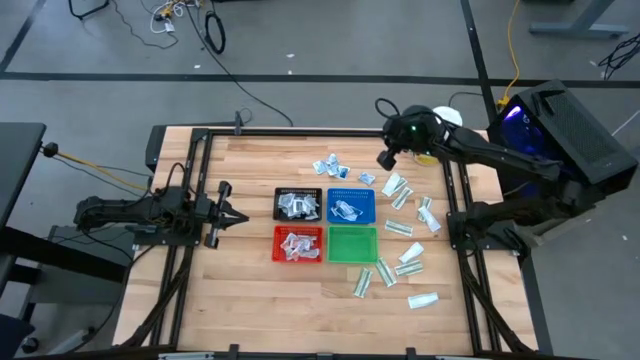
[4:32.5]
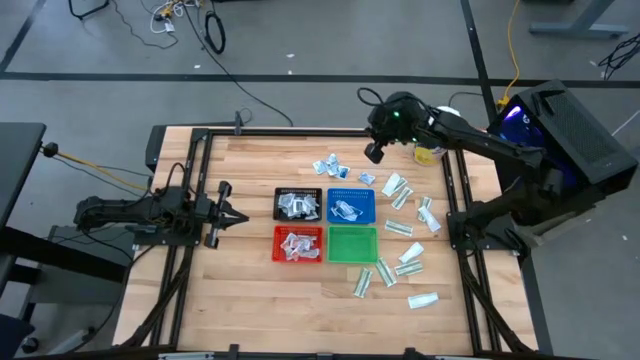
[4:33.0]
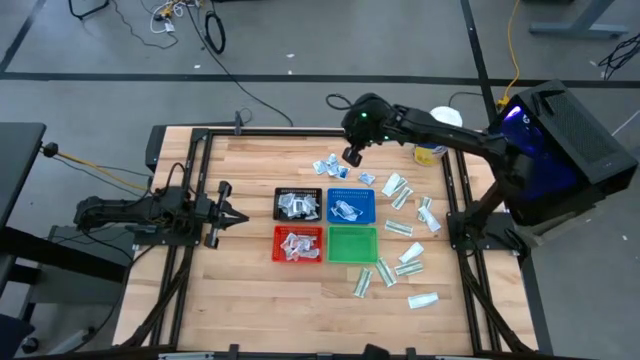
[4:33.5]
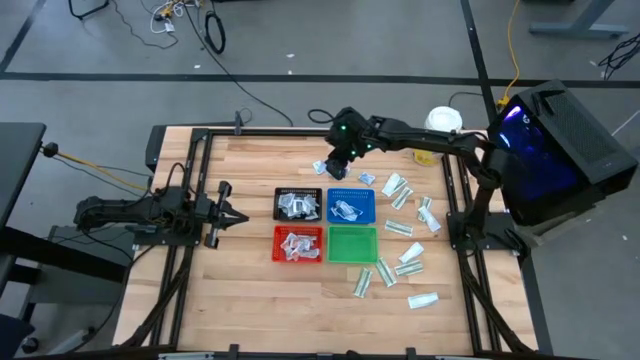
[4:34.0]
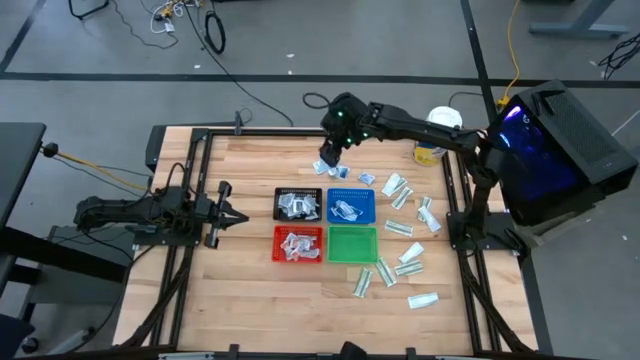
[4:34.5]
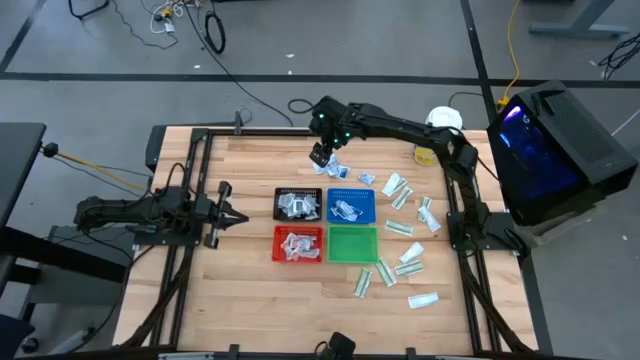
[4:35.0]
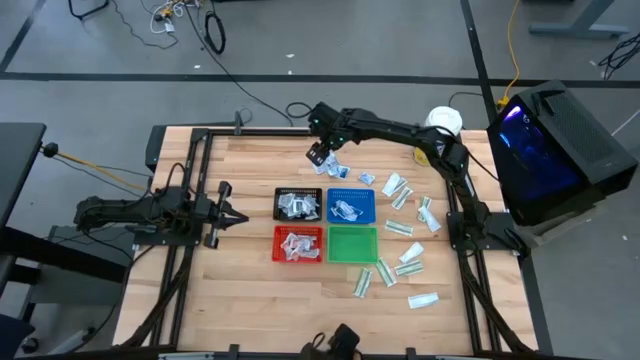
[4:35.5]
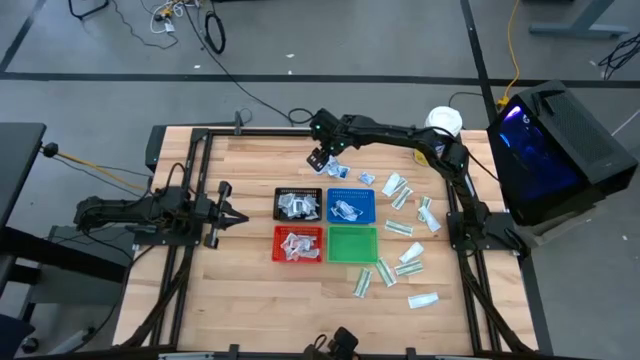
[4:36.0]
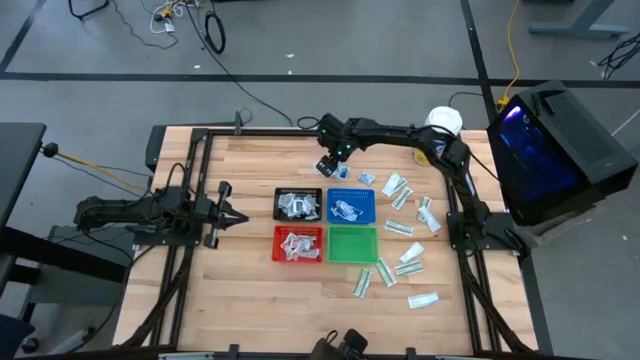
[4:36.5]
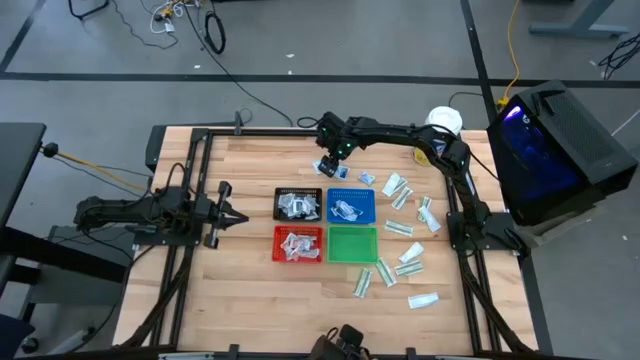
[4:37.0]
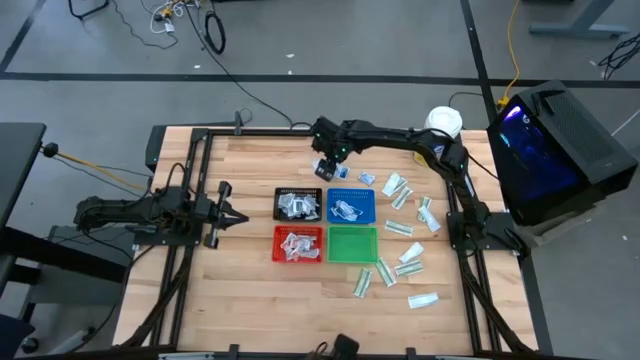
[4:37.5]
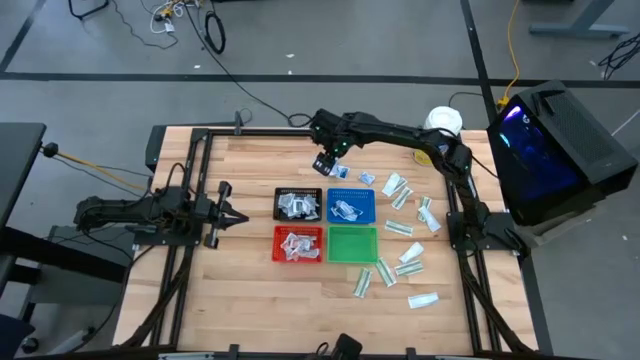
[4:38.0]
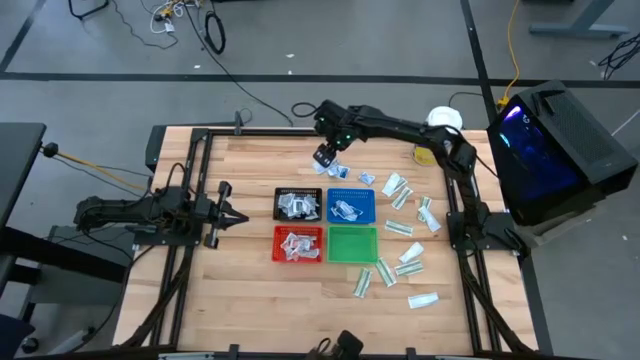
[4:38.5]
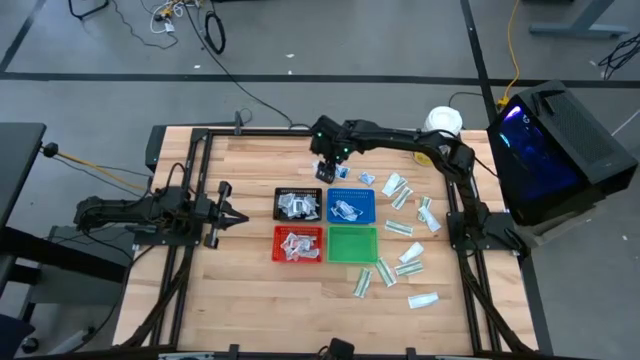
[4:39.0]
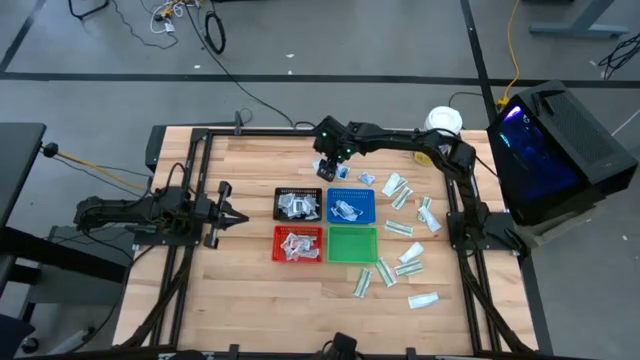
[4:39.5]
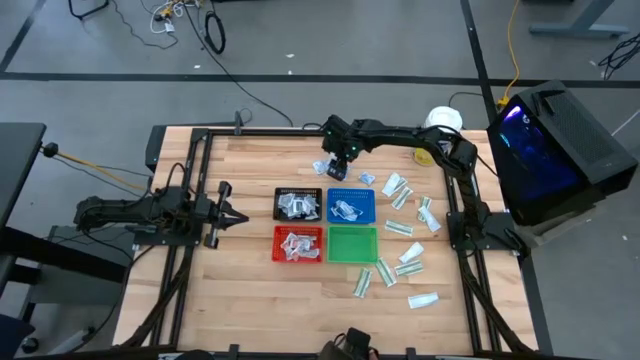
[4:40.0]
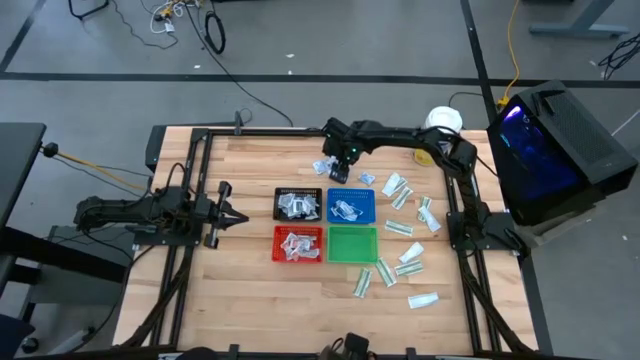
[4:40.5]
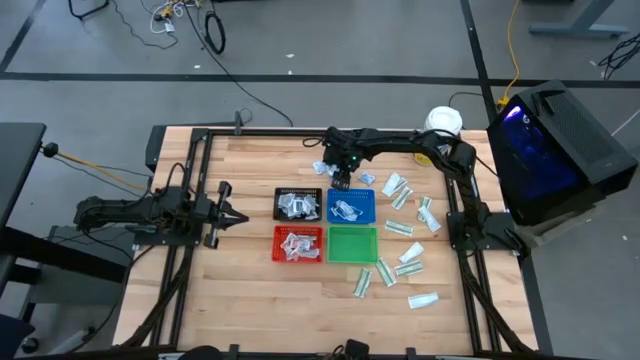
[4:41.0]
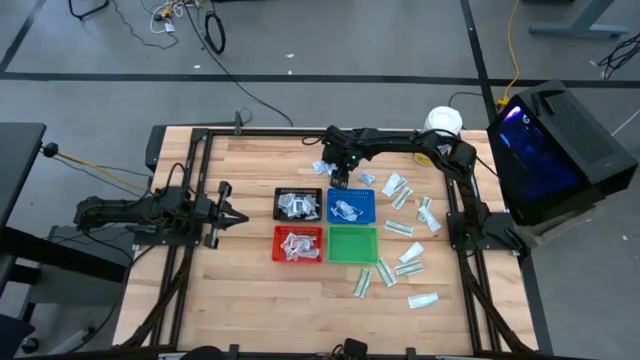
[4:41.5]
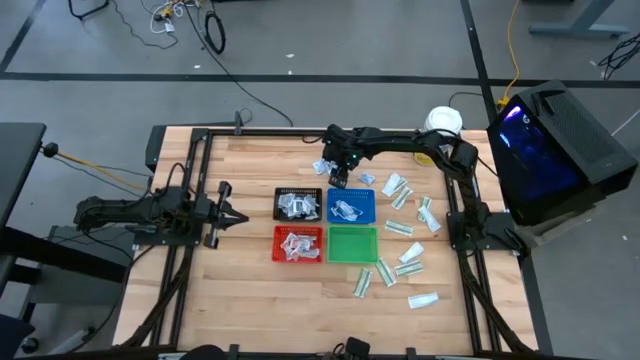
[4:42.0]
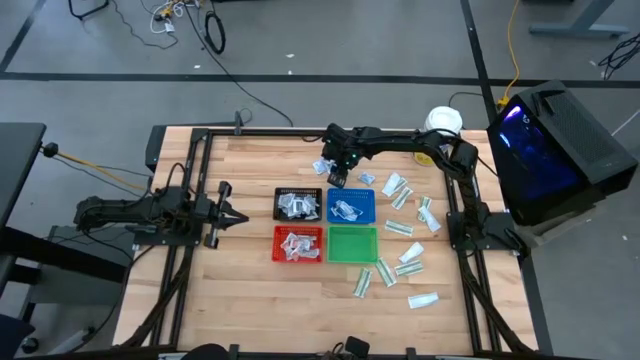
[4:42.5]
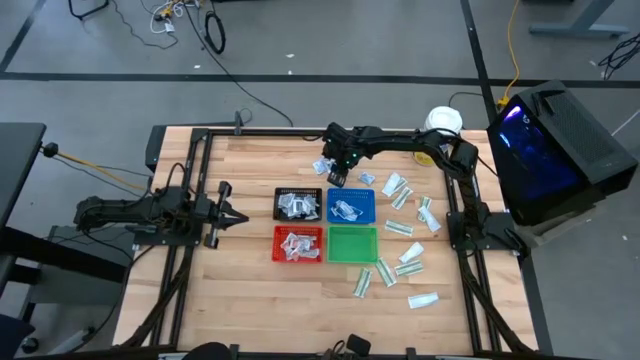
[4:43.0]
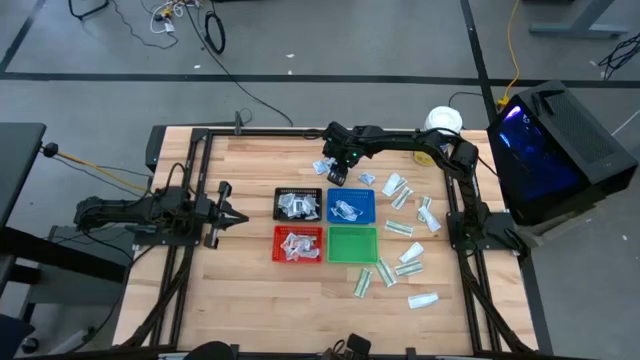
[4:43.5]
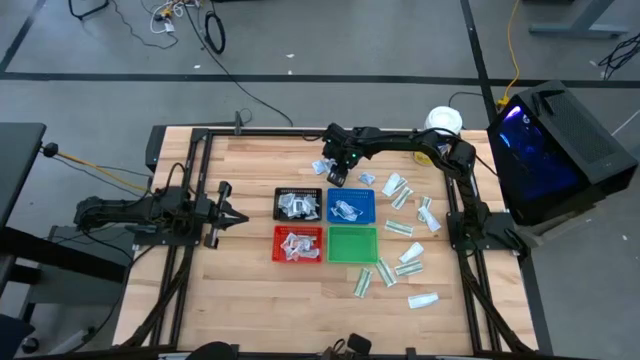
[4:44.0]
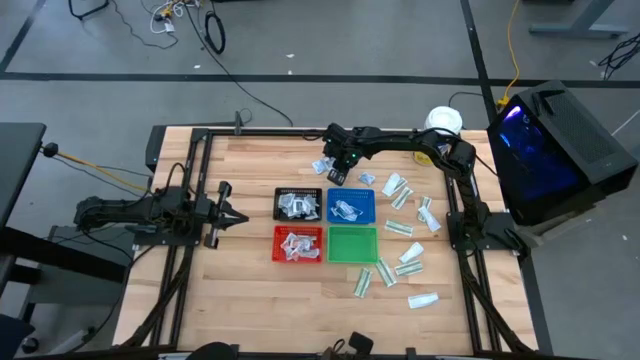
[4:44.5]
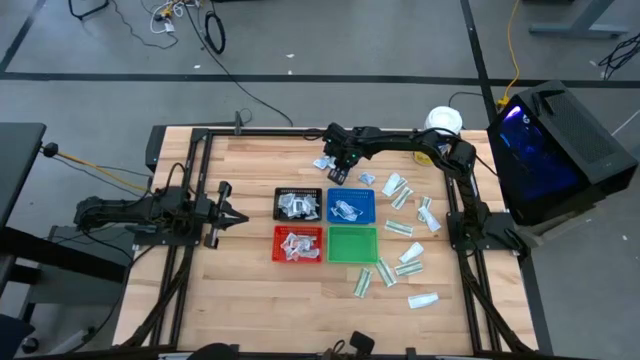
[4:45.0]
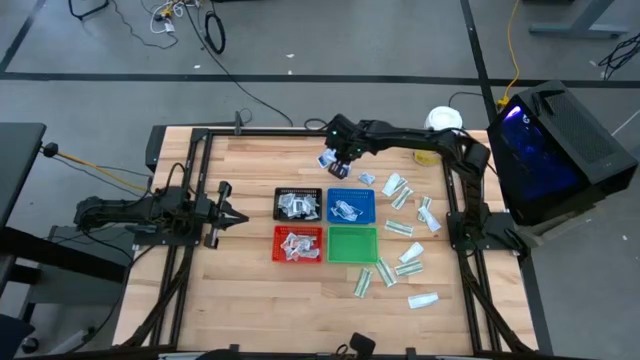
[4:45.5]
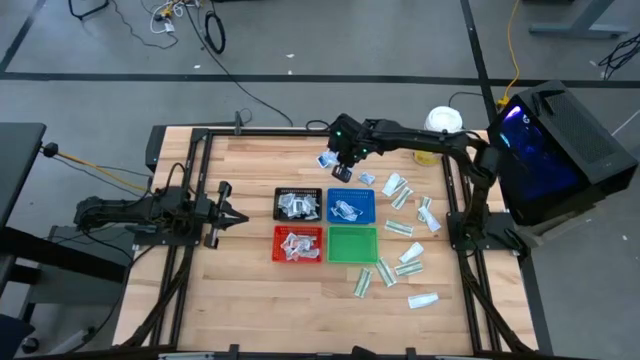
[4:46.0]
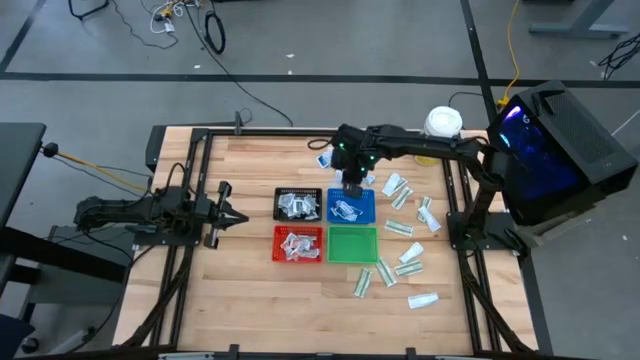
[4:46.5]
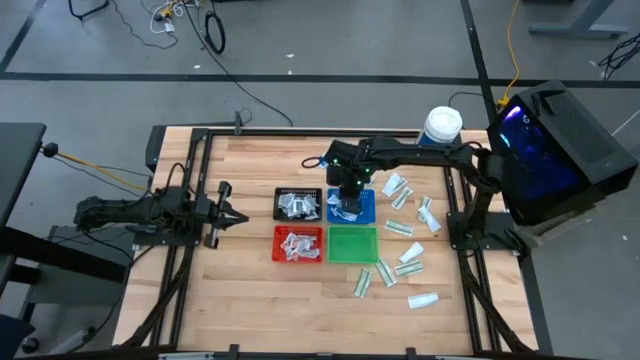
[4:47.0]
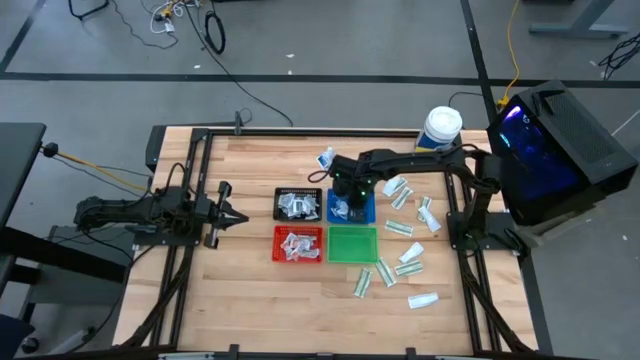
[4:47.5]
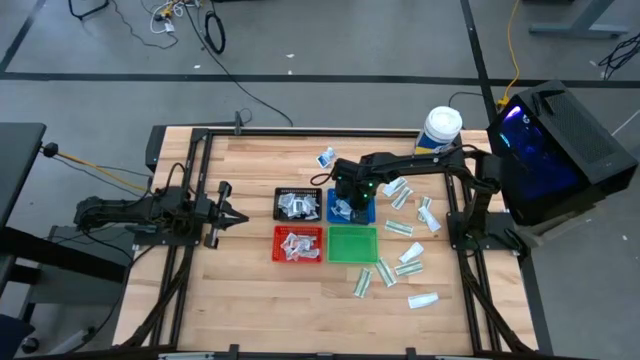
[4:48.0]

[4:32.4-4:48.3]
Task: Pick & Place First Aid Supplies
Put the blue alcohol pad into the blue bin

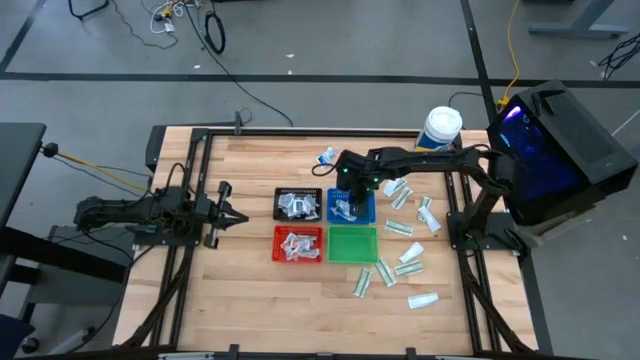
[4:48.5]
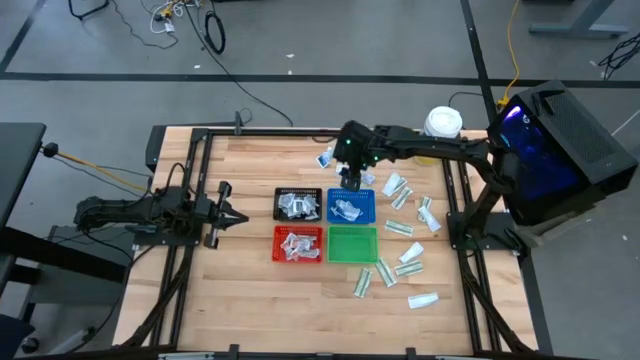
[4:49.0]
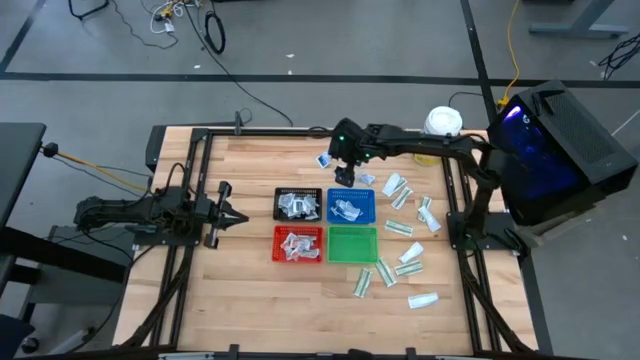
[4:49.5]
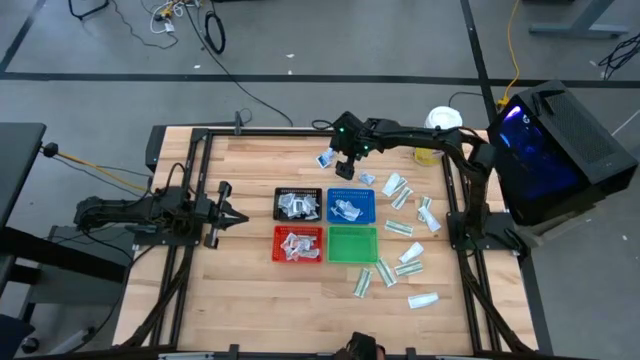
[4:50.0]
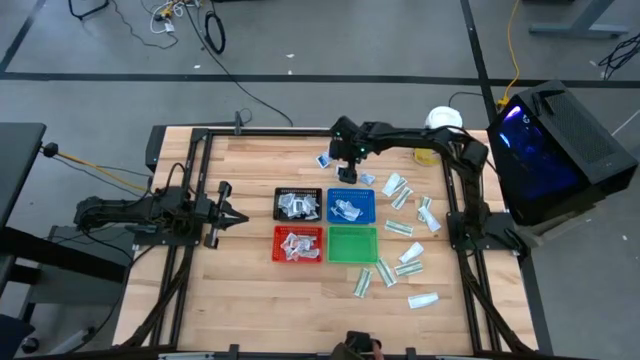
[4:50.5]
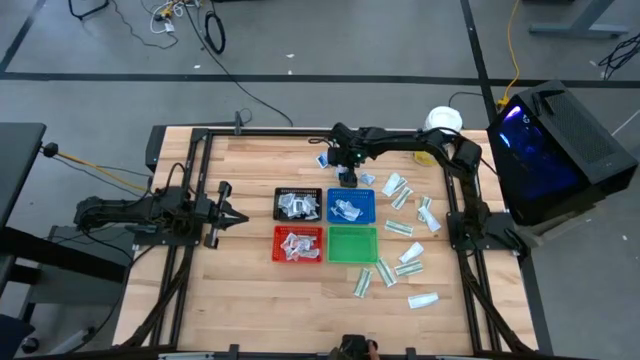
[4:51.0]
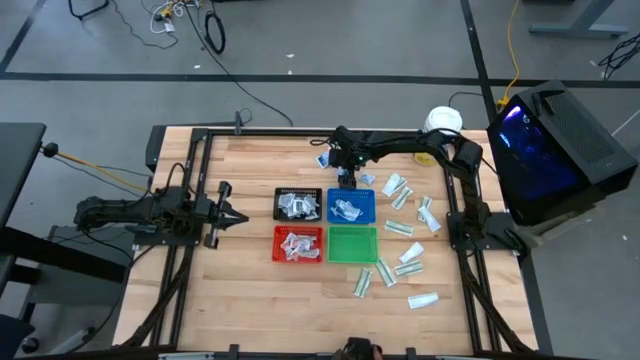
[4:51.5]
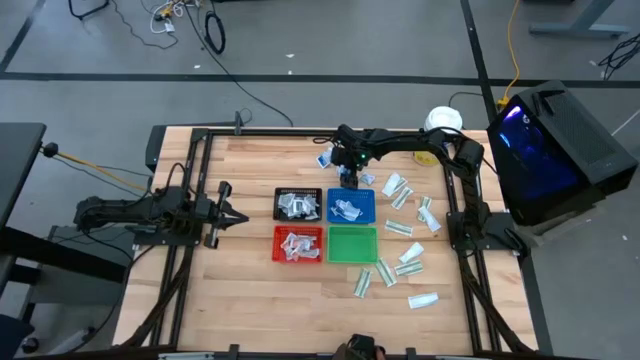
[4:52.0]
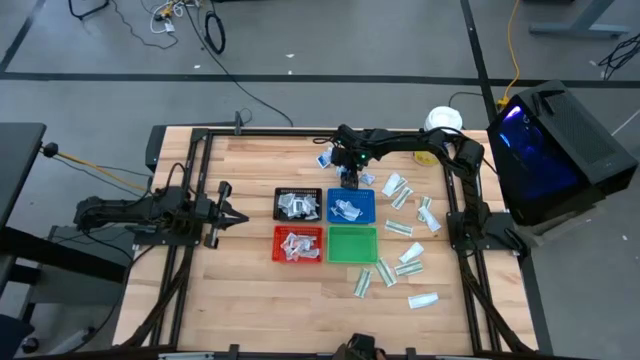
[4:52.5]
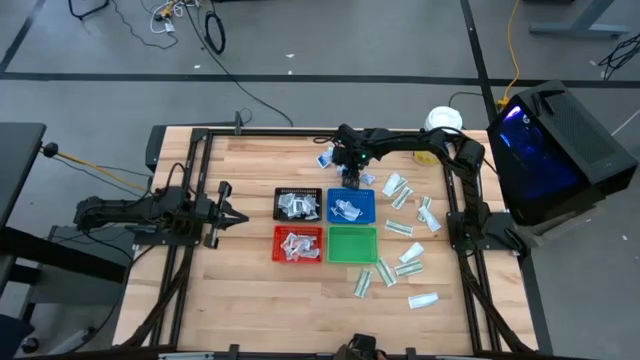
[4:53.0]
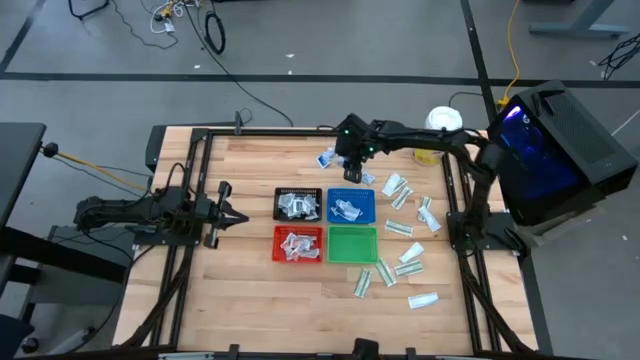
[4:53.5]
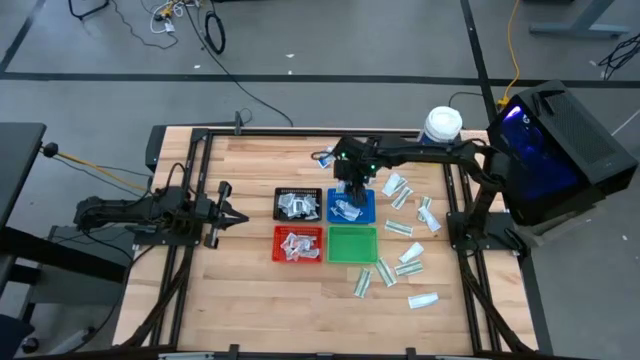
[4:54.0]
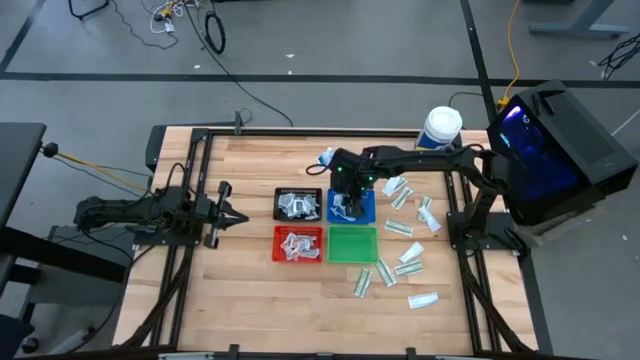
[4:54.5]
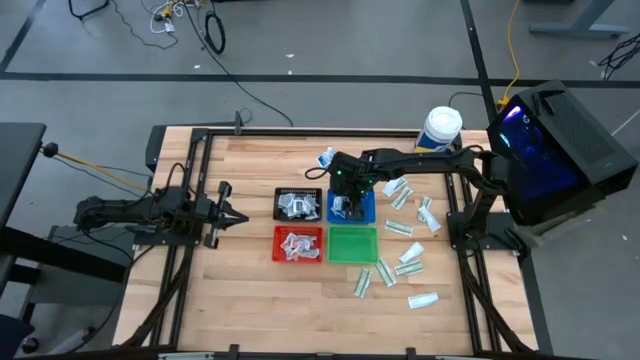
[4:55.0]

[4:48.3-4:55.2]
Put the blue alcohol pad into the blue bin
